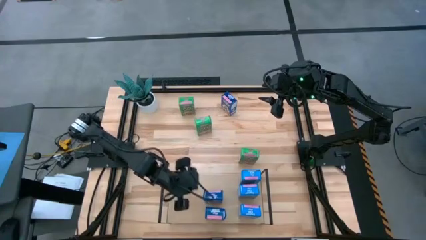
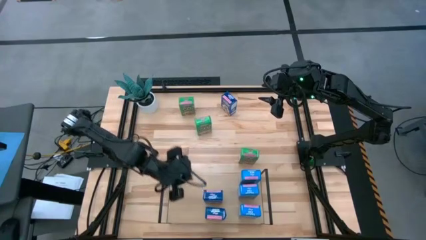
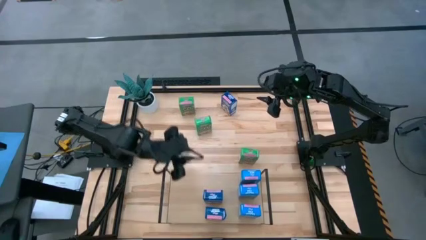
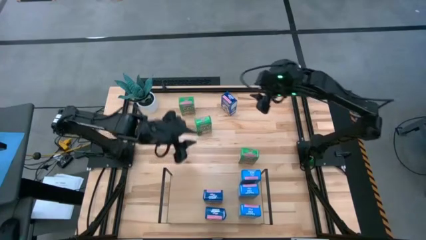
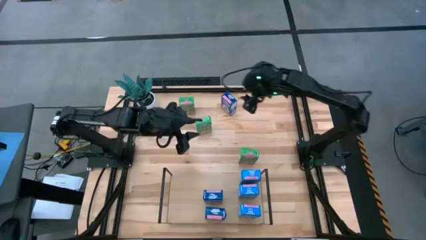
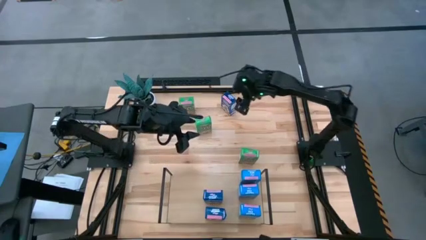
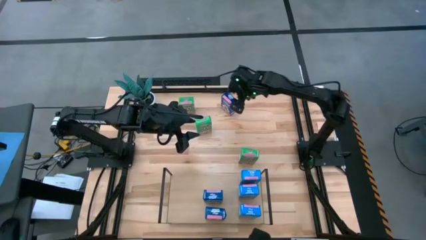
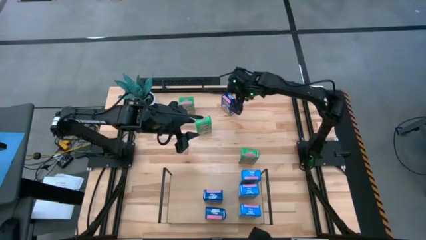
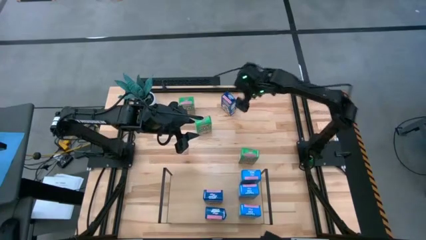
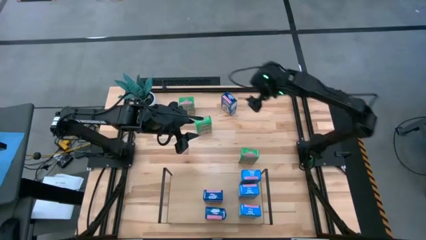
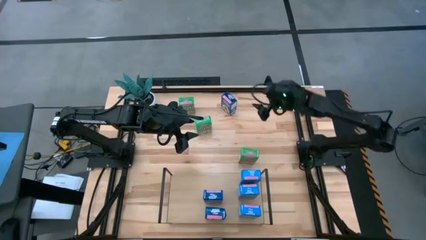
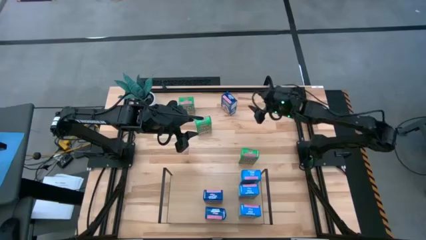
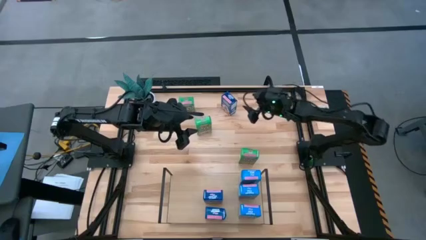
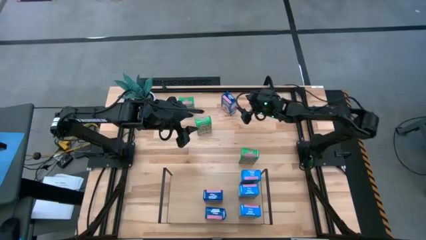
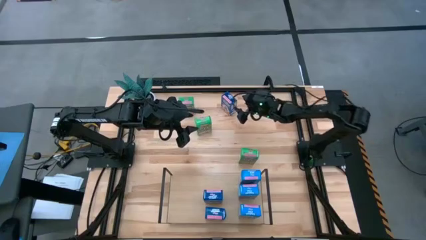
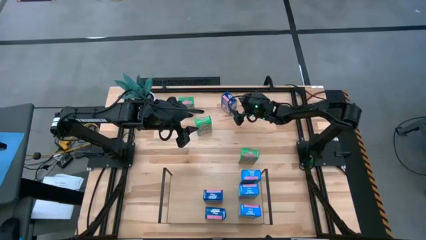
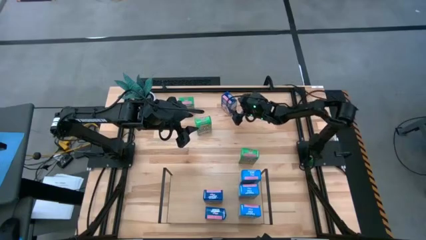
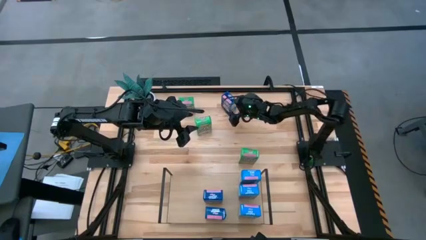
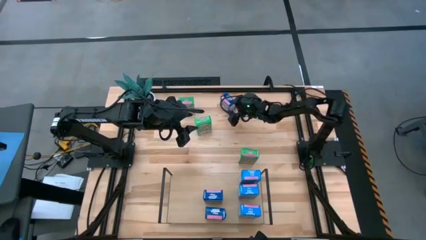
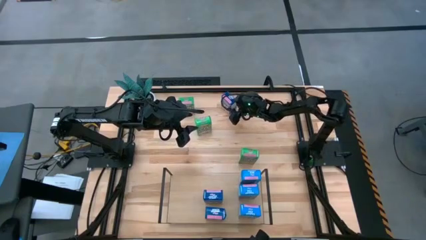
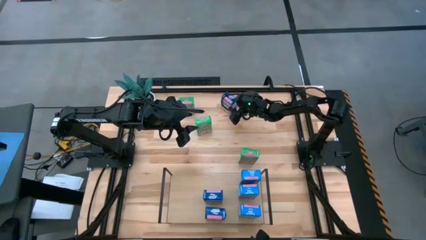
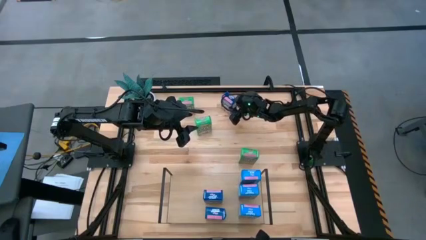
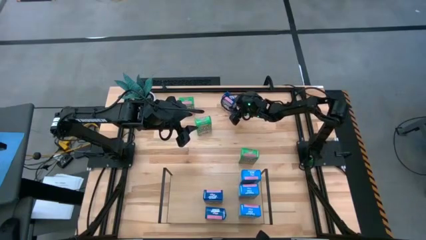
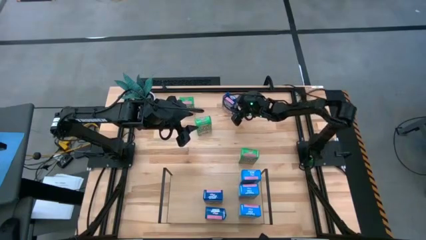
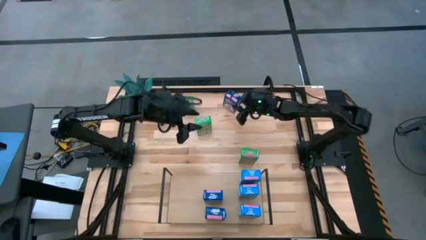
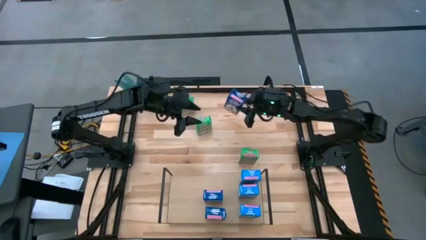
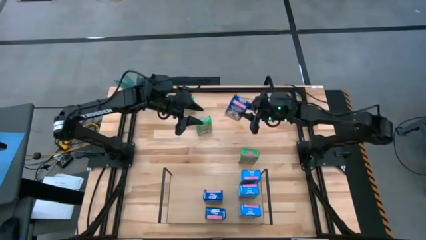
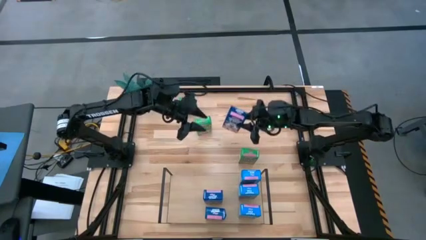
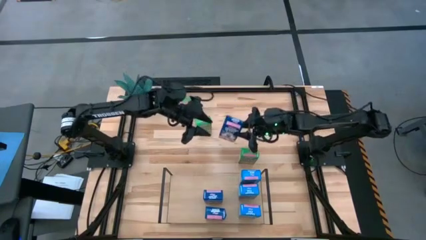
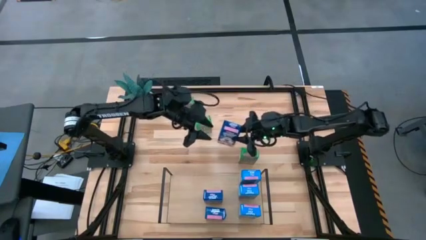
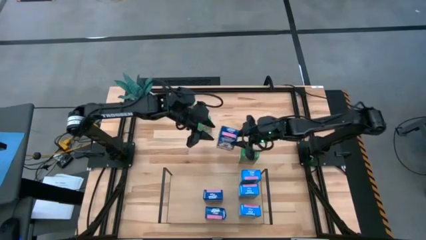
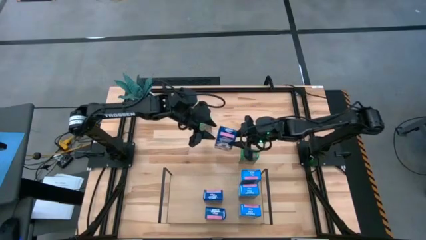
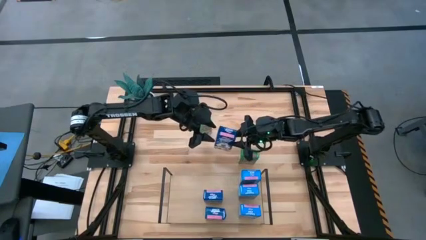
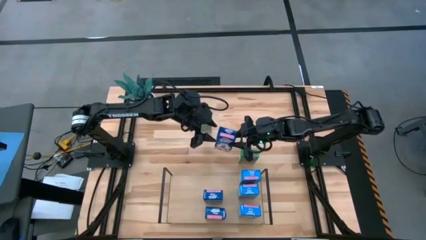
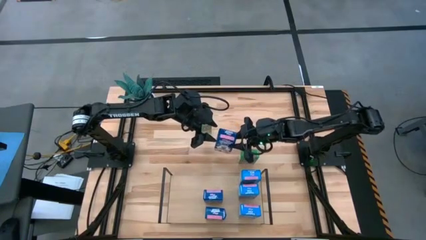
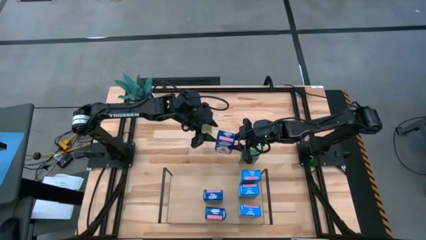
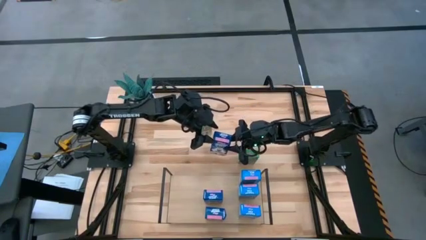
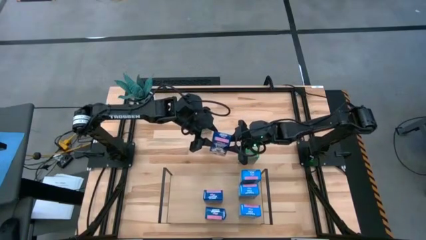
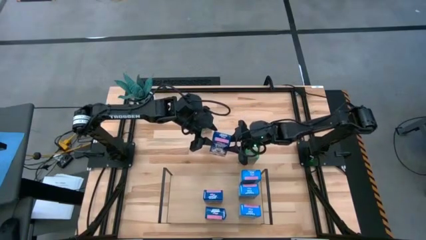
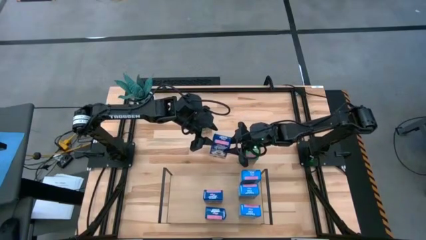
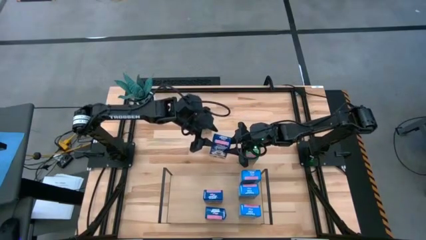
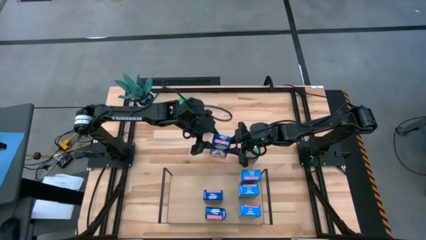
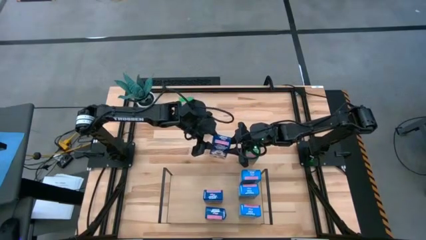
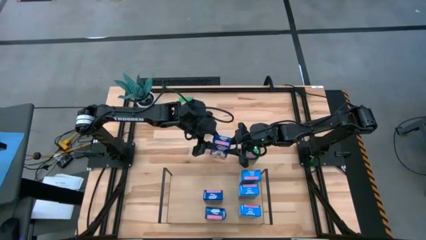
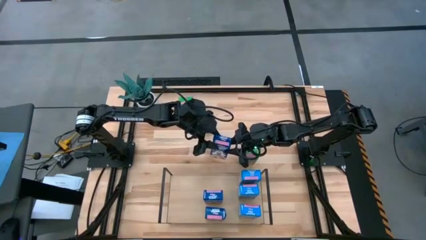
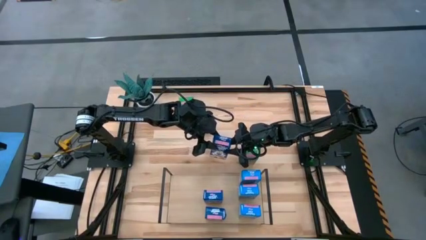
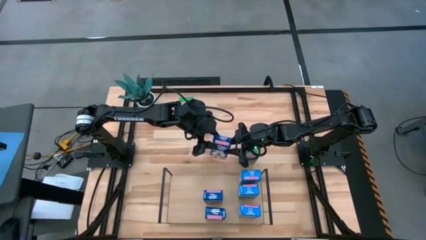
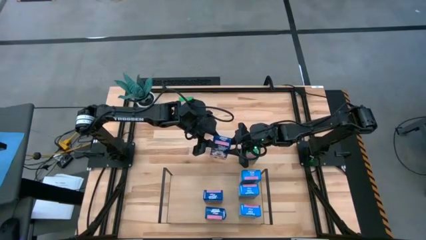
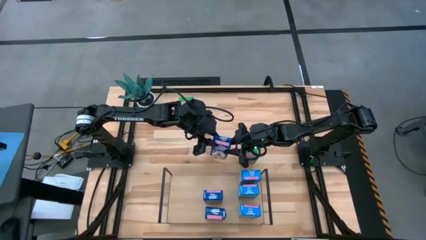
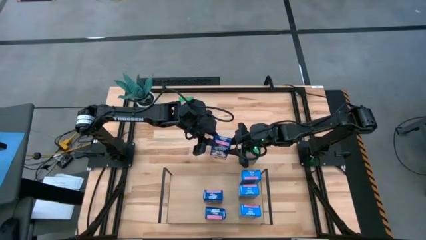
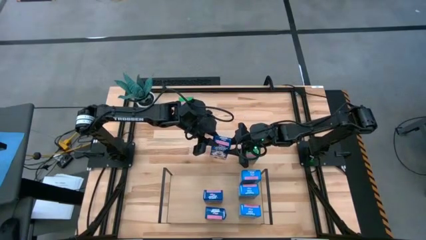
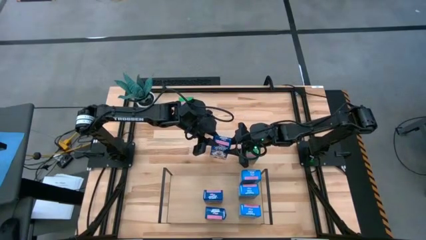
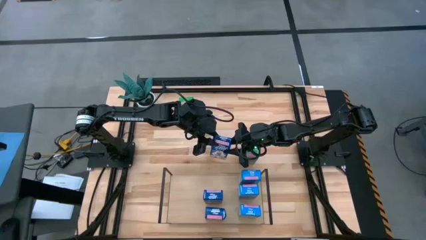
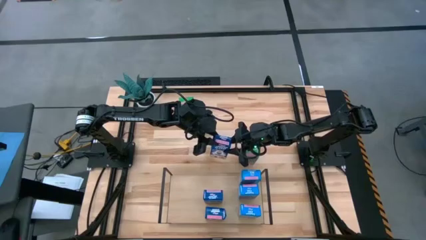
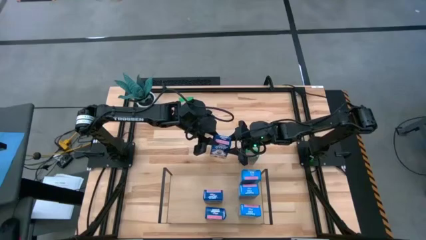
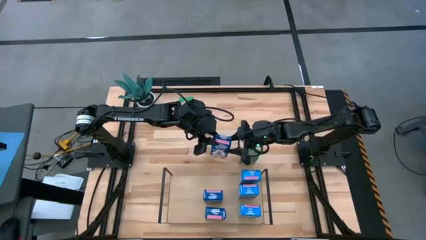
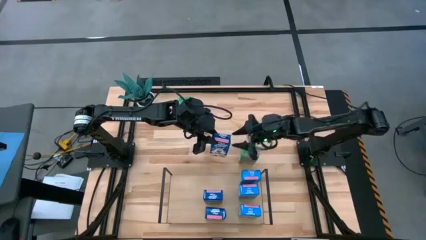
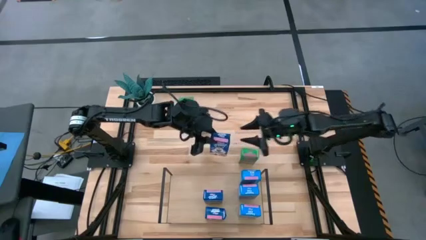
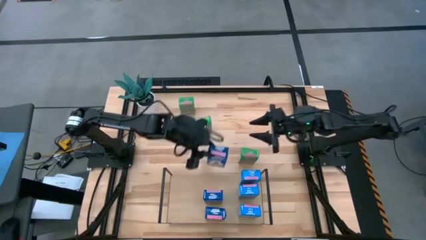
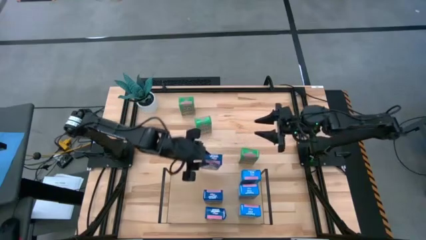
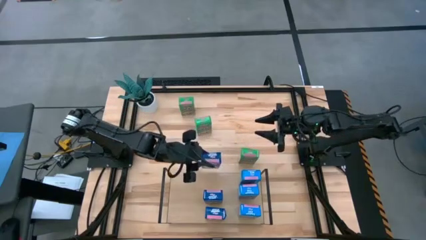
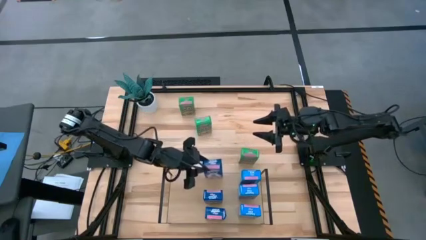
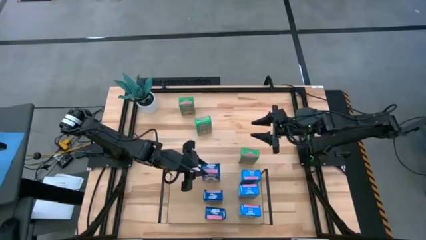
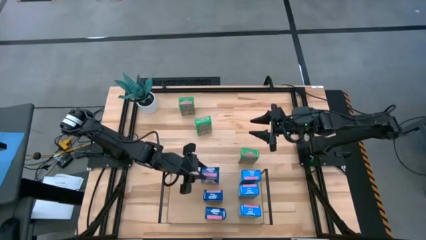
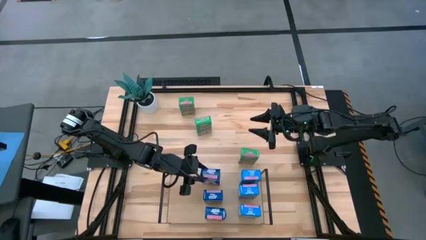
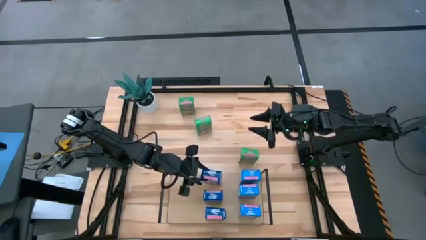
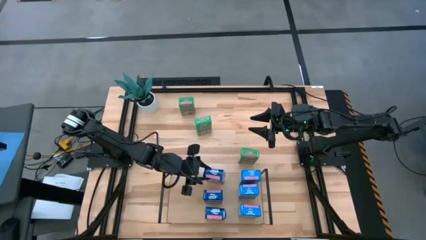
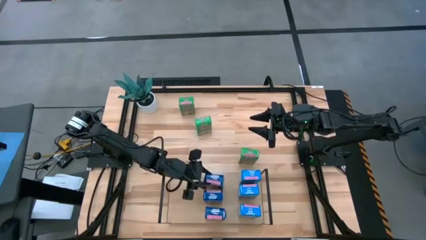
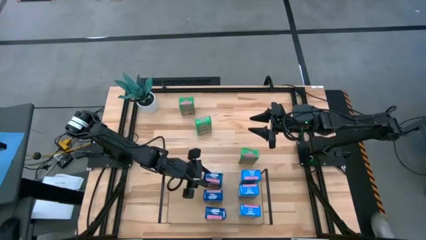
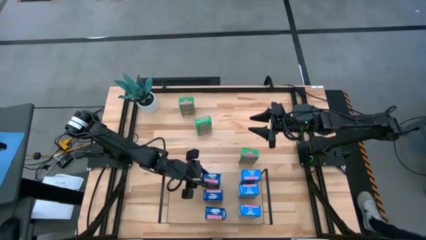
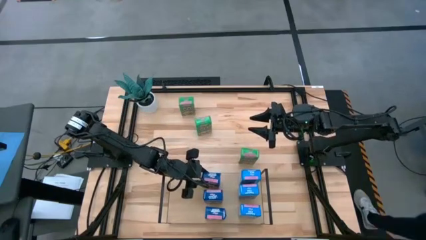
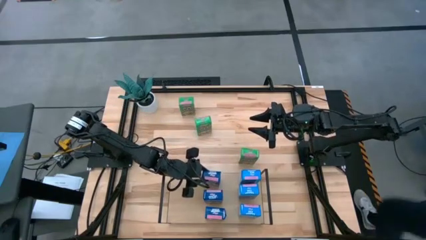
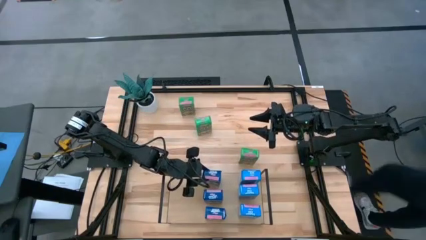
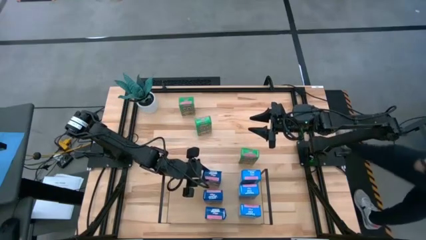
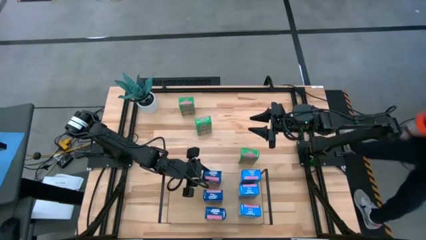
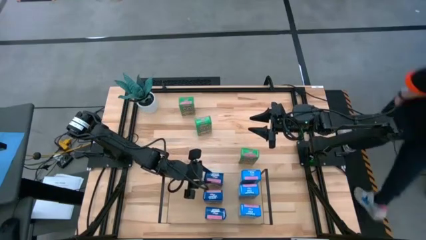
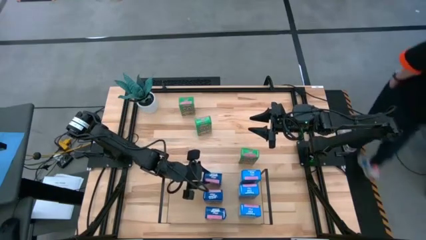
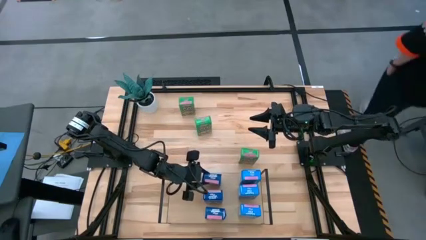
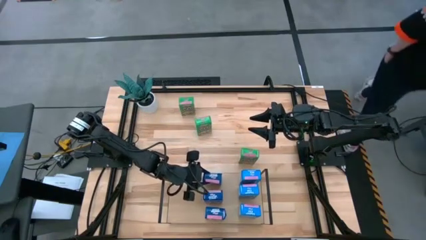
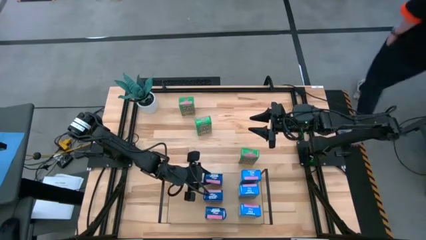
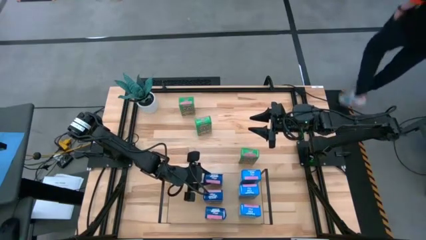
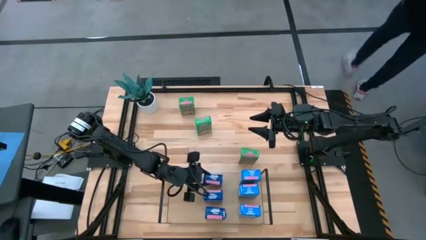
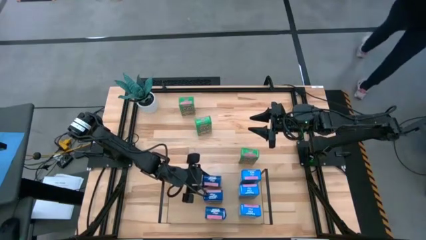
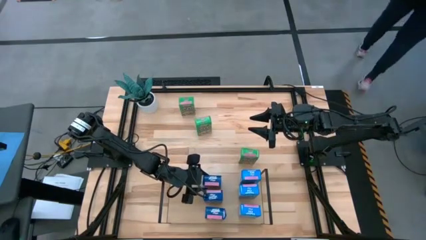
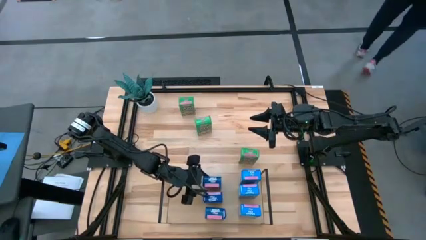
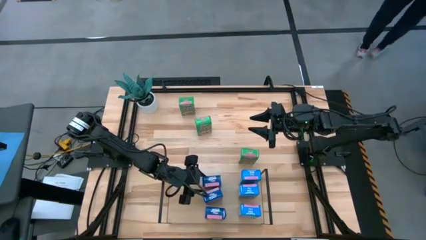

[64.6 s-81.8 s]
Task: Stack cereal on shelf
Put the blue cereal box on the shelf aligned with the other blue cereal box
